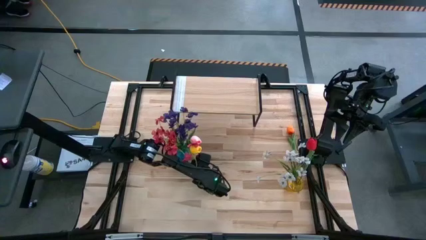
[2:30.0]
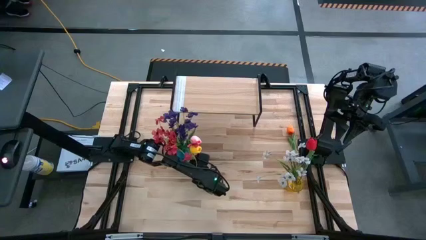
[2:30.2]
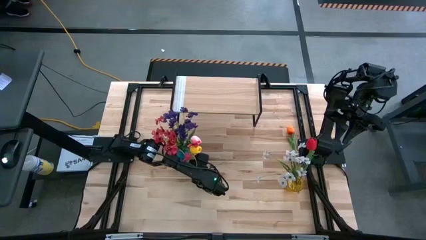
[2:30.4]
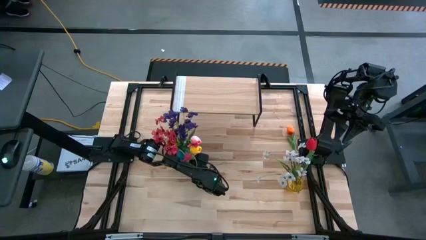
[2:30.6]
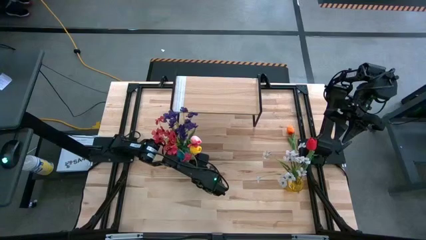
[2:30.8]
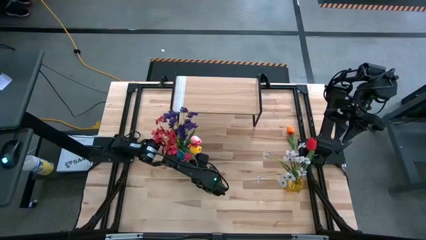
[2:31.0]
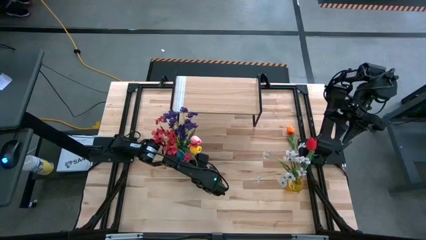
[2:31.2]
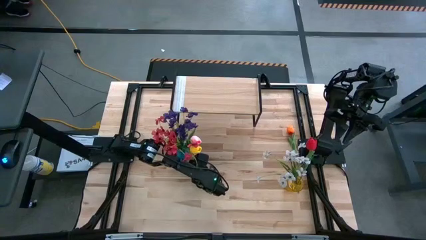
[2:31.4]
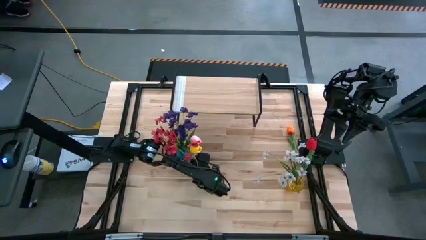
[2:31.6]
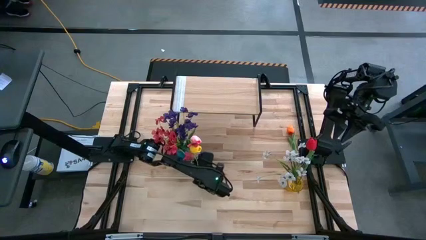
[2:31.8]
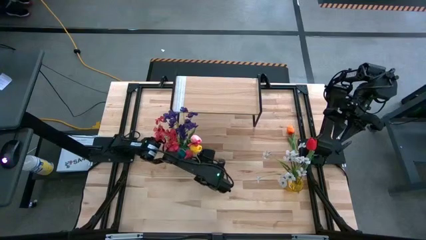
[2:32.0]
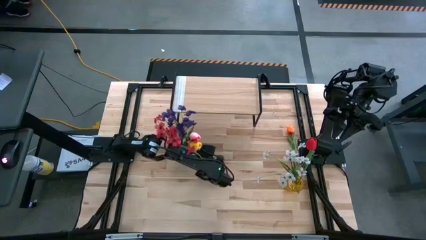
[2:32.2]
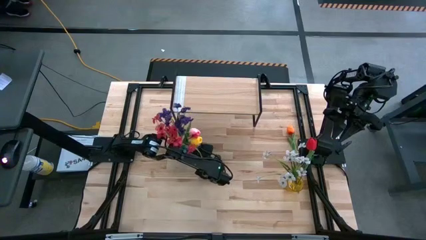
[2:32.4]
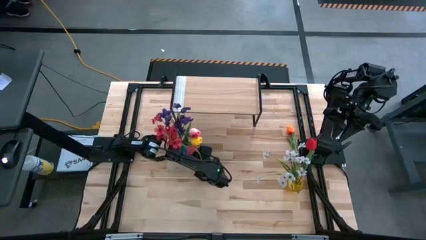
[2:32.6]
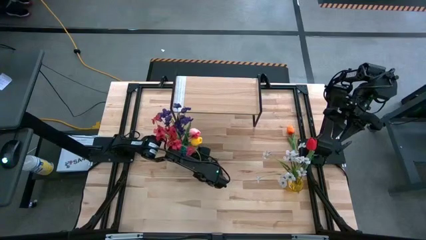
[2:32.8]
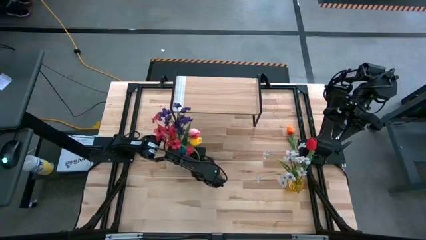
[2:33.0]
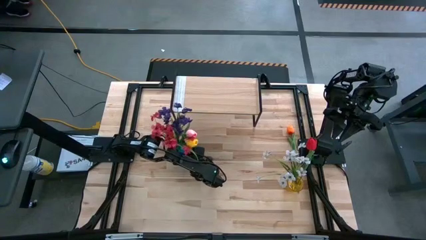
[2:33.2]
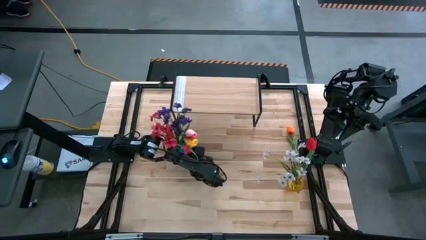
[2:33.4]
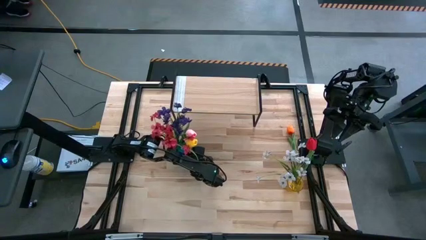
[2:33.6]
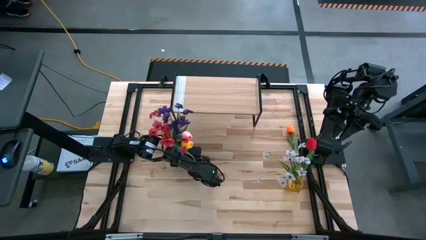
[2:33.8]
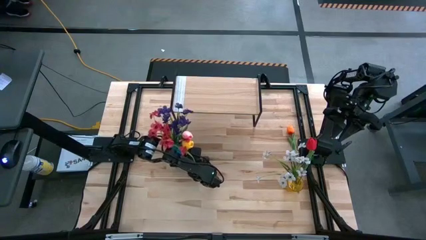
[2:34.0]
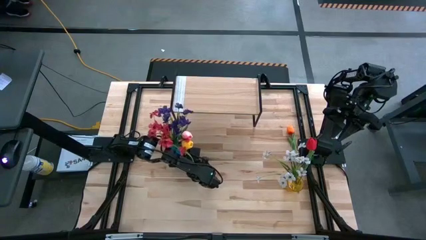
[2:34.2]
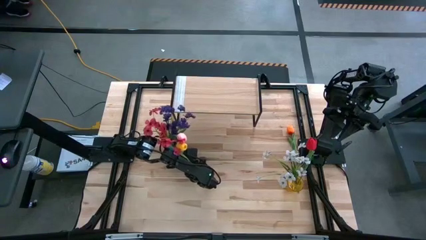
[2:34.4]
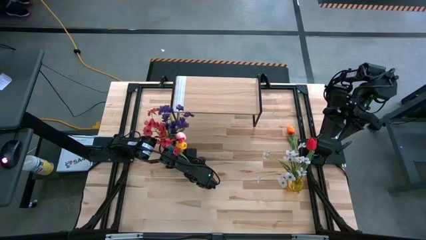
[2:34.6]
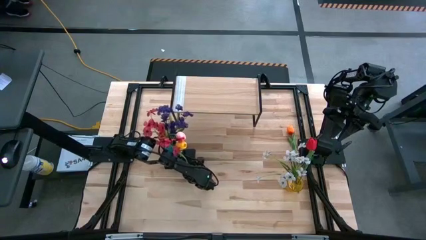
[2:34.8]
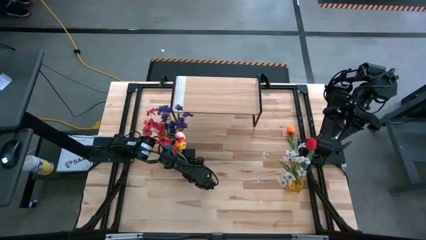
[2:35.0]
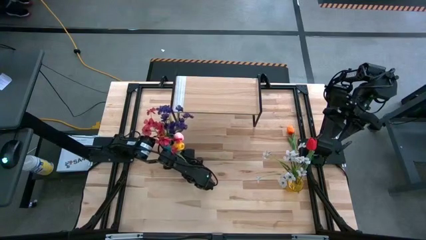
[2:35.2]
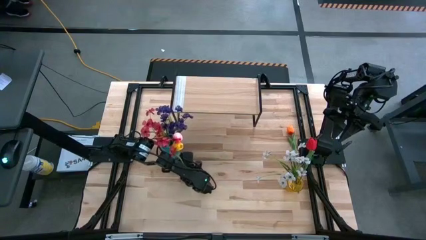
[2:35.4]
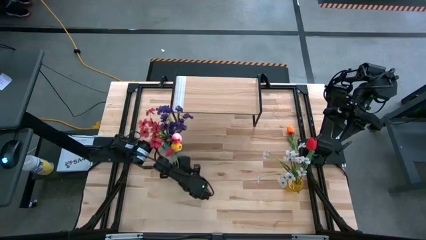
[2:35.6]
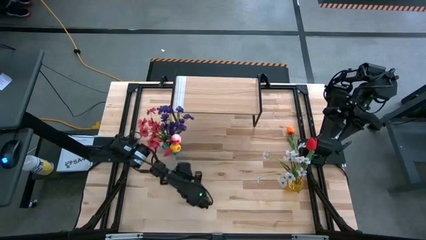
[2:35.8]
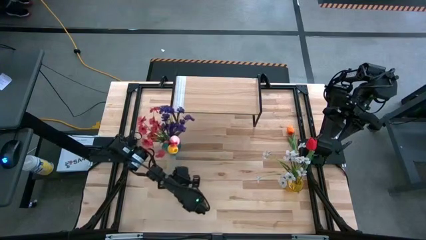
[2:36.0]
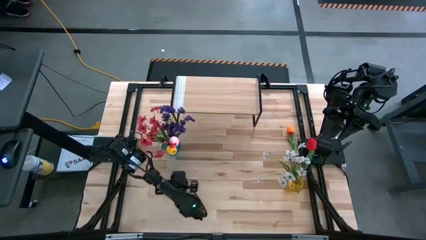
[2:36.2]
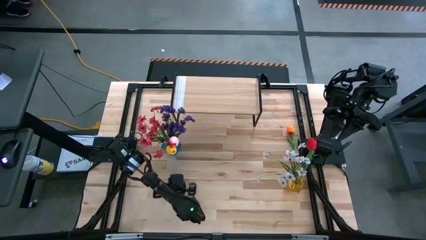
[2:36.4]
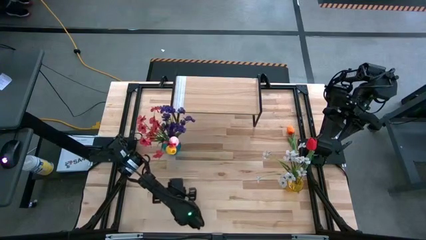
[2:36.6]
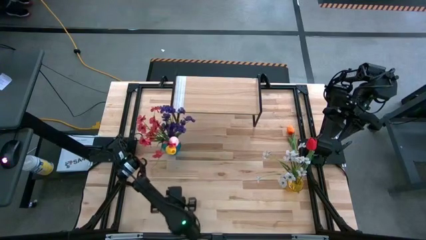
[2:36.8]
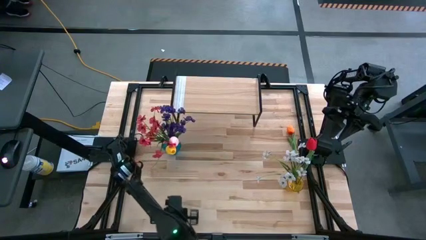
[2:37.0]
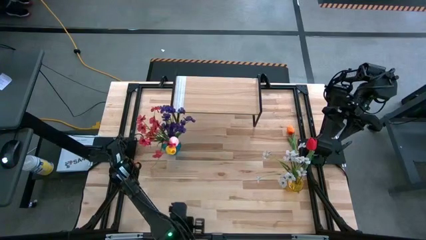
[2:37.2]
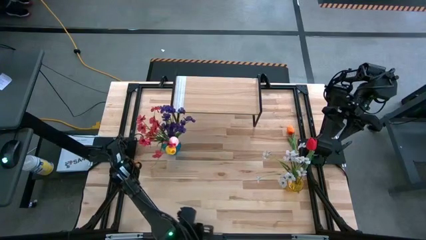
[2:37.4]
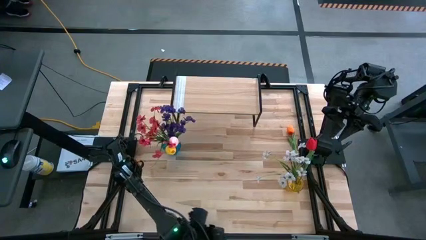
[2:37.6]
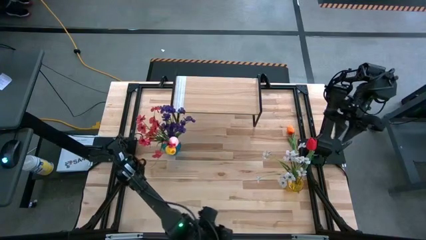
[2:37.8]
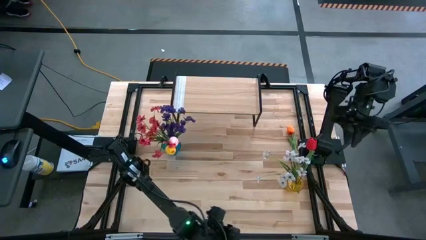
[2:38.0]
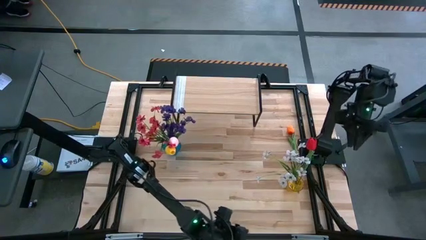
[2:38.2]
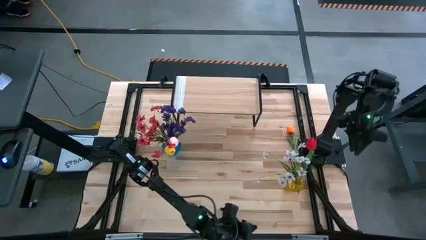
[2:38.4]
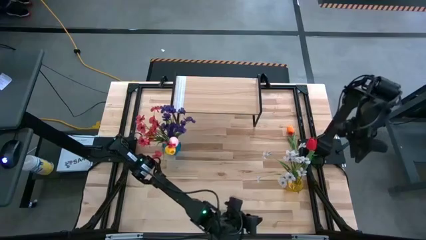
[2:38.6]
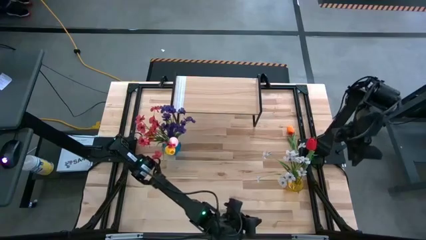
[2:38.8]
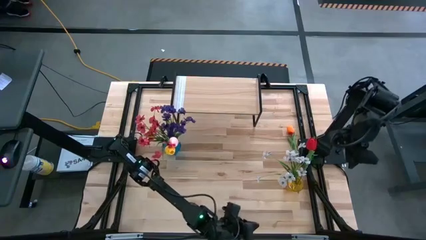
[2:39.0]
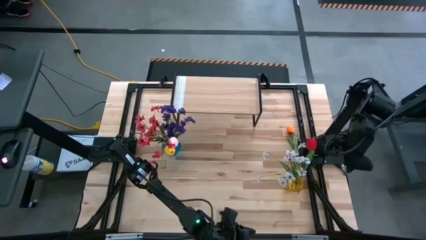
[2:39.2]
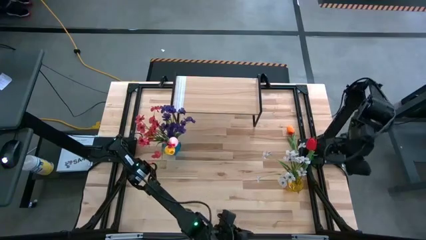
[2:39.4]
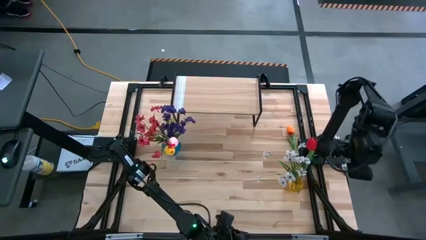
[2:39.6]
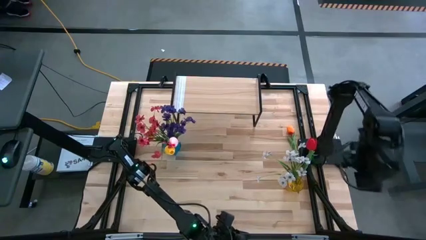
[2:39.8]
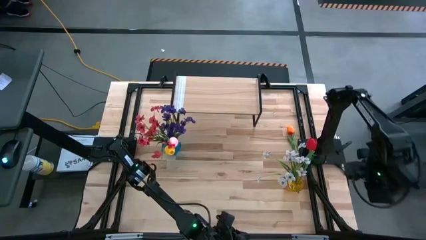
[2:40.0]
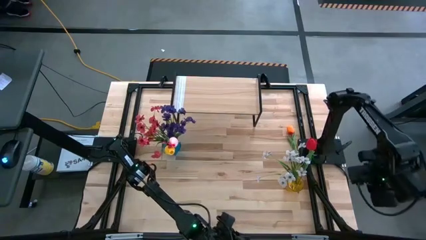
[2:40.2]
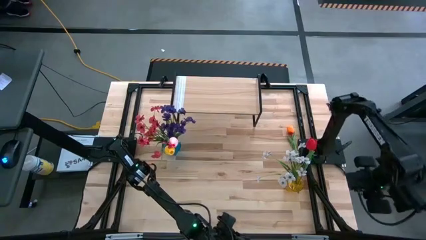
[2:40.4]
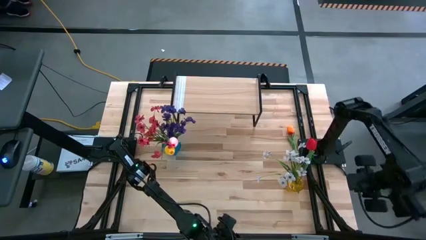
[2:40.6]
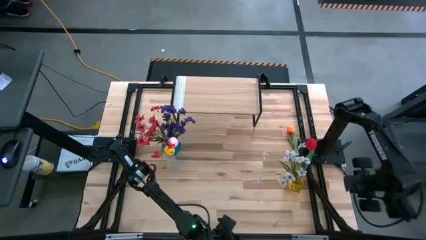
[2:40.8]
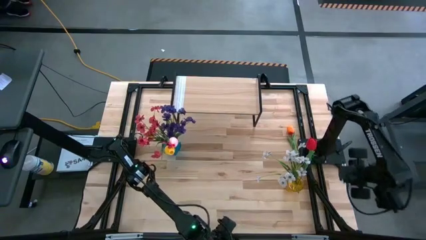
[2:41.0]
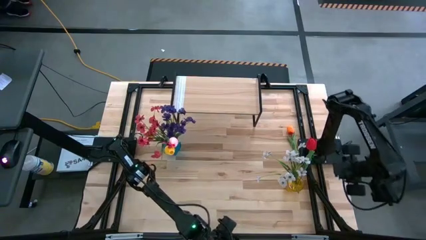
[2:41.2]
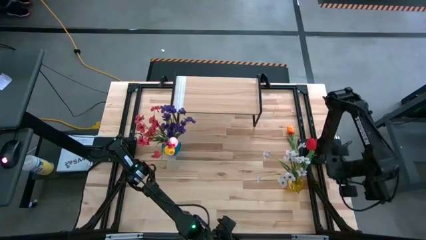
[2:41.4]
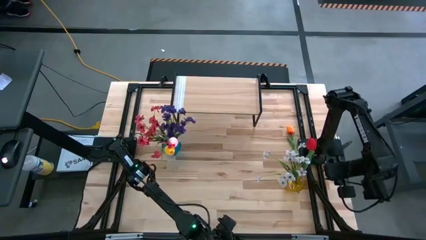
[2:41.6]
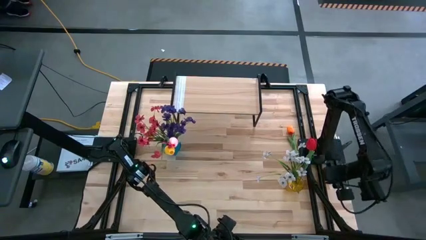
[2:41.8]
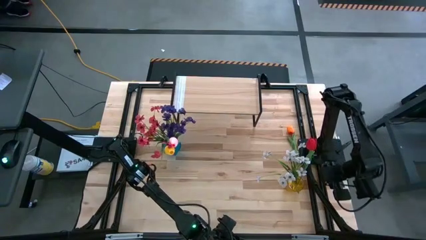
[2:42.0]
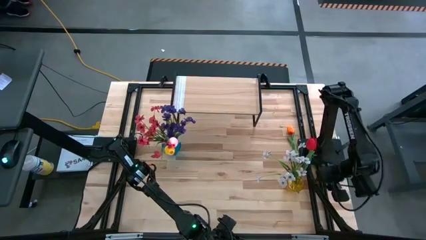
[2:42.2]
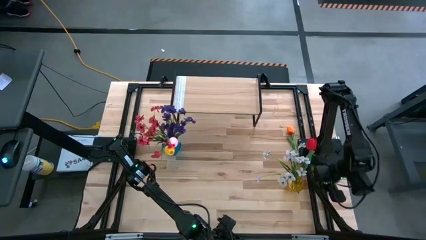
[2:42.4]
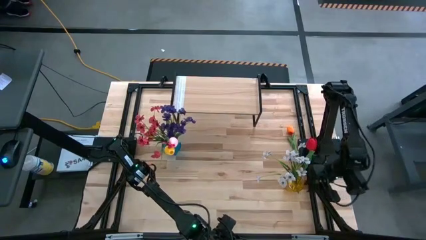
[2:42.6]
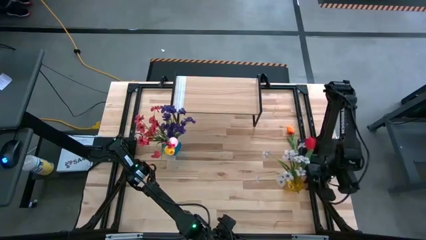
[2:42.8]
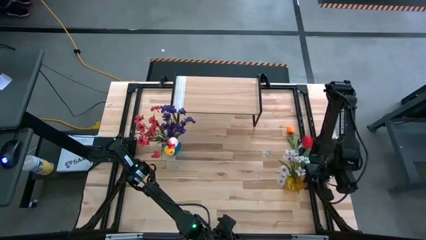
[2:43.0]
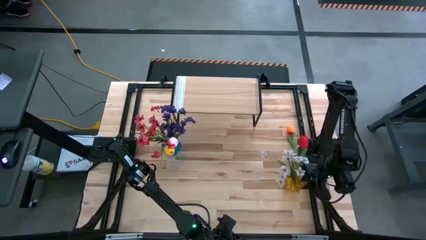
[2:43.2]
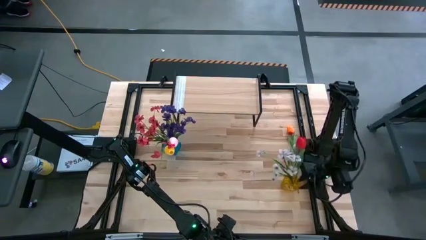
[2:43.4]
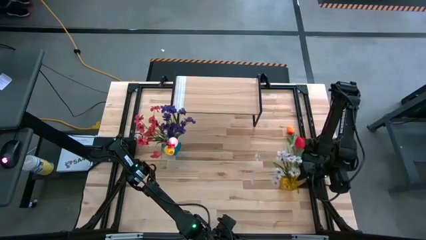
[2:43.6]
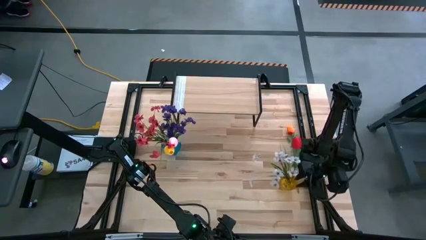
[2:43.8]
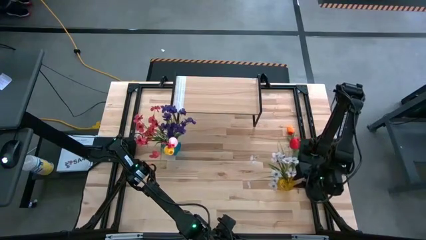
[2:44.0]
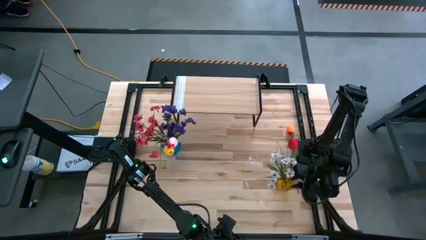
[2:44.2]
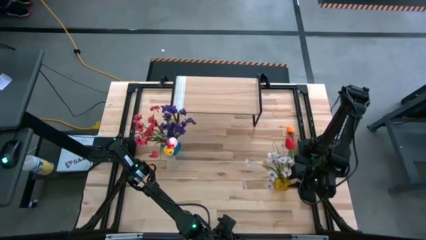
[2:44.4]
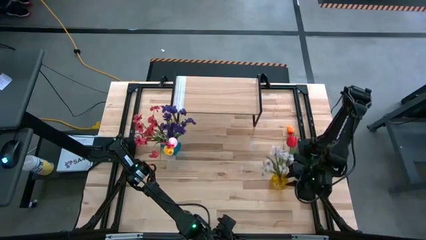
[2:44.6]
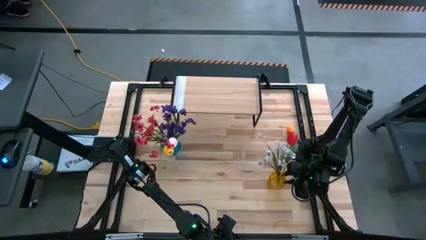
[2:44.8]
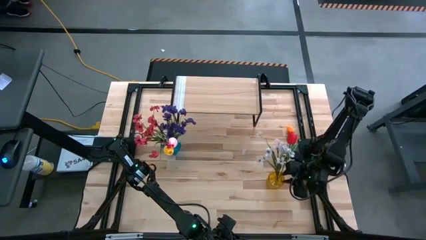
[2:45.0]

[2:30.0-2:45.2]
Task: Pick and place flowers into a vace then onto a shelf
Adjust the vases
